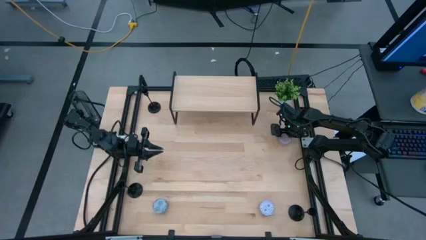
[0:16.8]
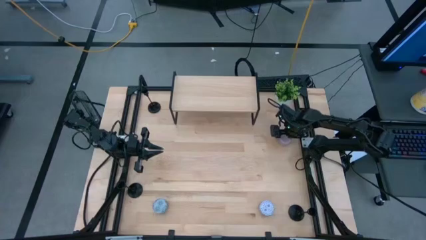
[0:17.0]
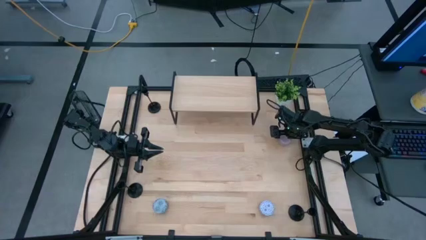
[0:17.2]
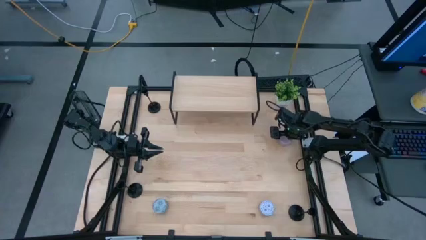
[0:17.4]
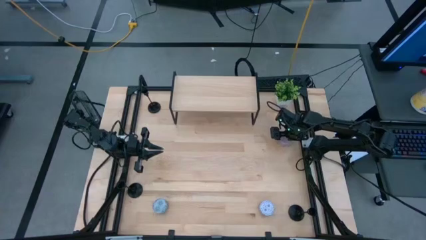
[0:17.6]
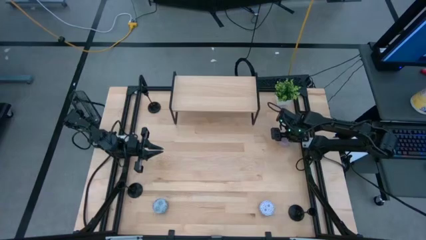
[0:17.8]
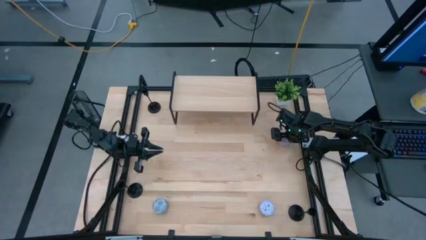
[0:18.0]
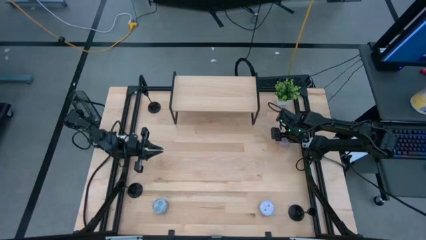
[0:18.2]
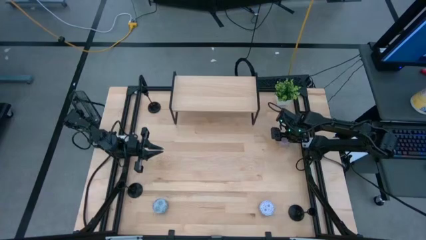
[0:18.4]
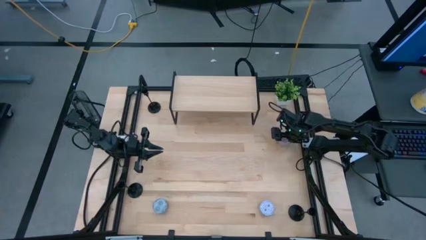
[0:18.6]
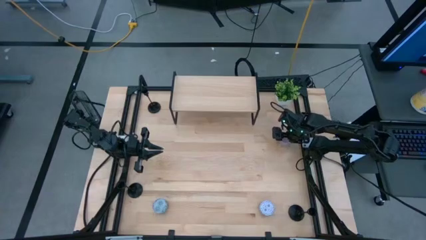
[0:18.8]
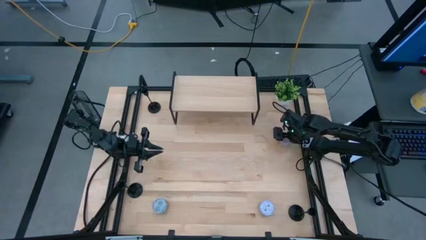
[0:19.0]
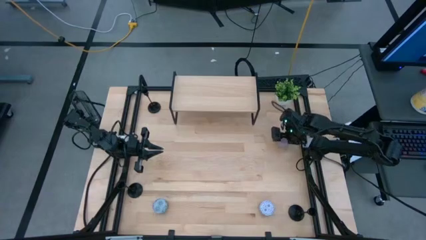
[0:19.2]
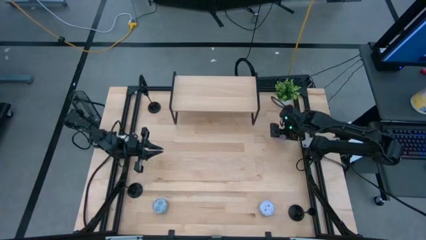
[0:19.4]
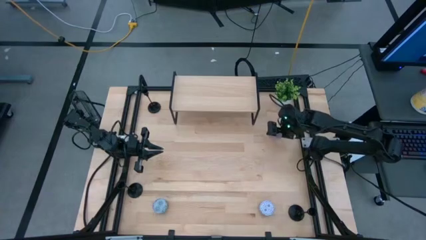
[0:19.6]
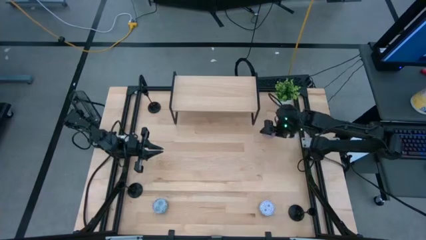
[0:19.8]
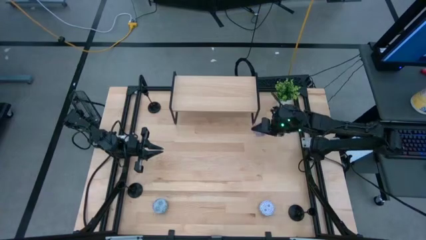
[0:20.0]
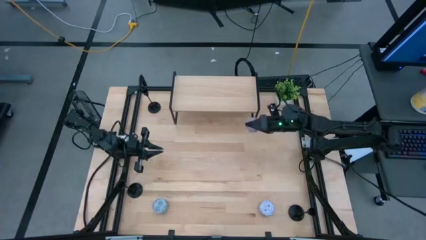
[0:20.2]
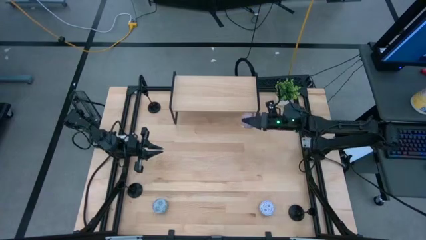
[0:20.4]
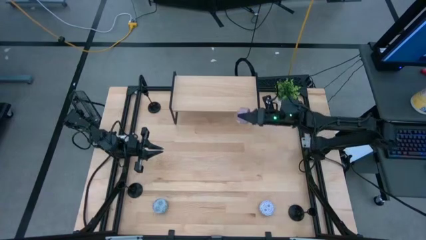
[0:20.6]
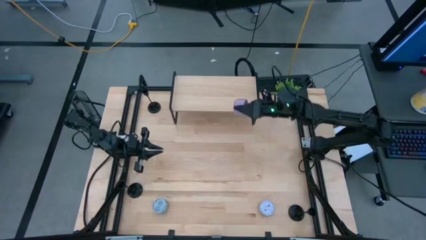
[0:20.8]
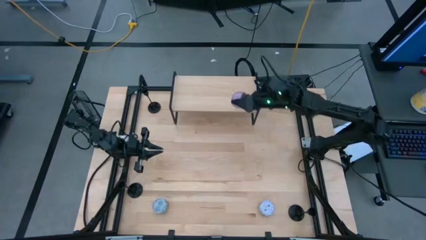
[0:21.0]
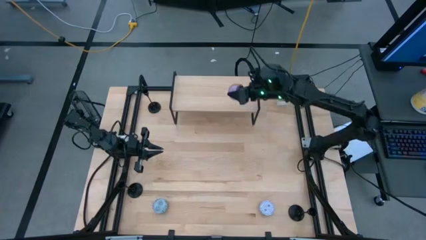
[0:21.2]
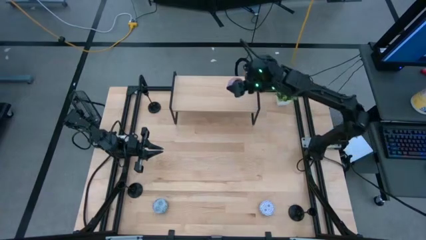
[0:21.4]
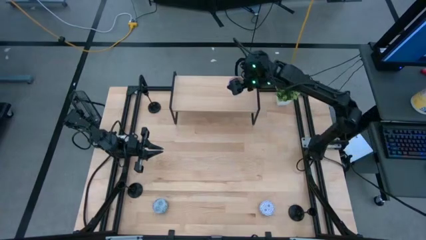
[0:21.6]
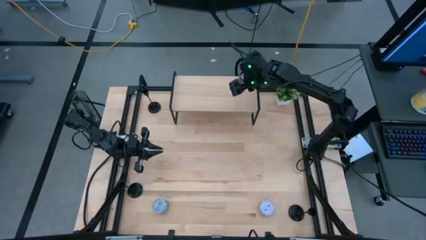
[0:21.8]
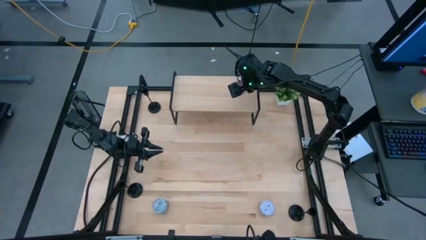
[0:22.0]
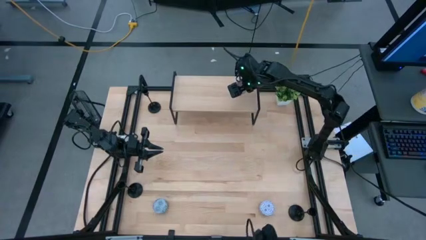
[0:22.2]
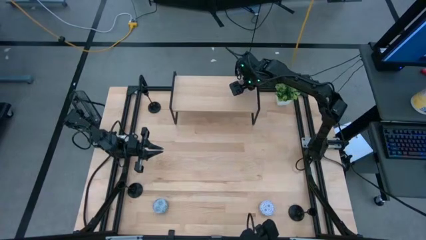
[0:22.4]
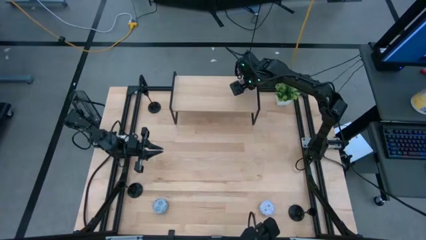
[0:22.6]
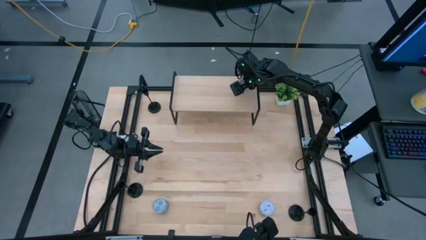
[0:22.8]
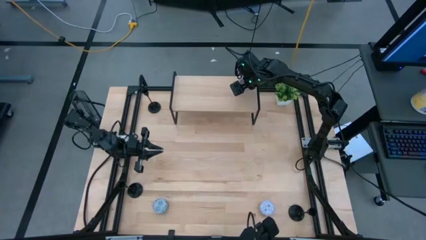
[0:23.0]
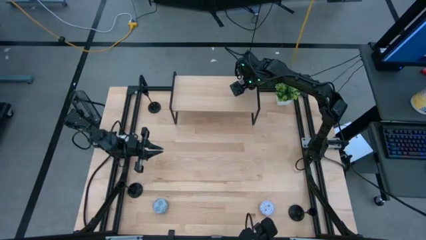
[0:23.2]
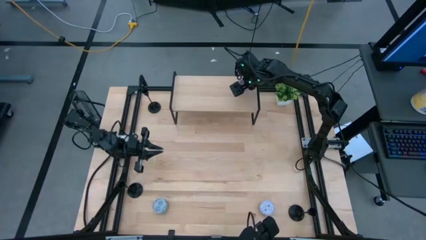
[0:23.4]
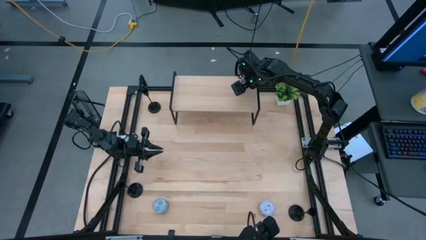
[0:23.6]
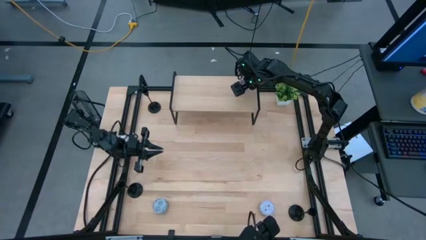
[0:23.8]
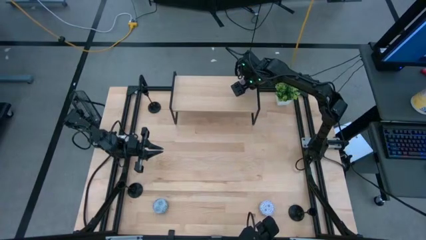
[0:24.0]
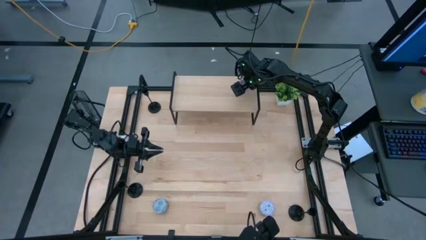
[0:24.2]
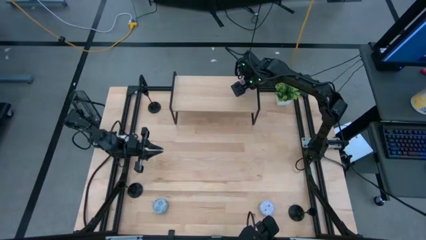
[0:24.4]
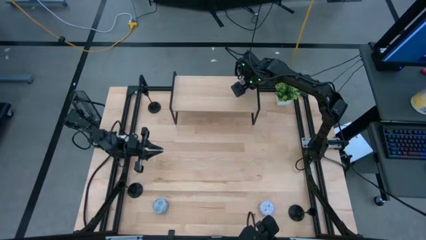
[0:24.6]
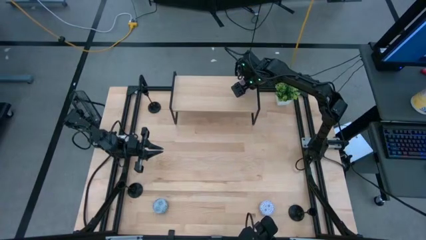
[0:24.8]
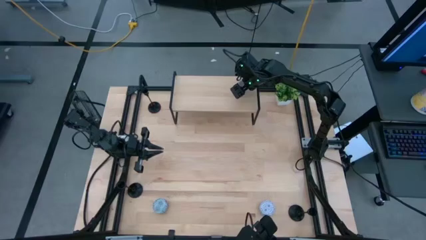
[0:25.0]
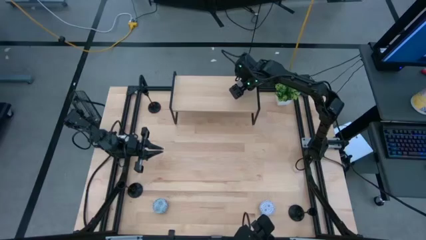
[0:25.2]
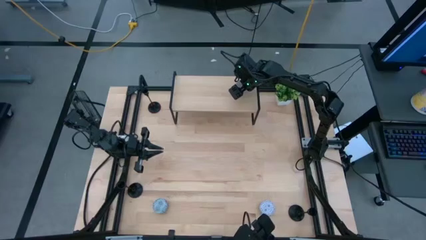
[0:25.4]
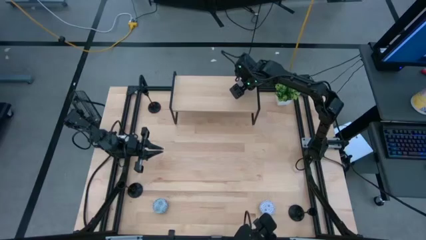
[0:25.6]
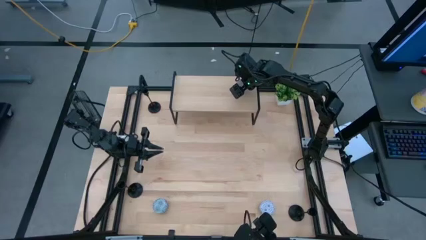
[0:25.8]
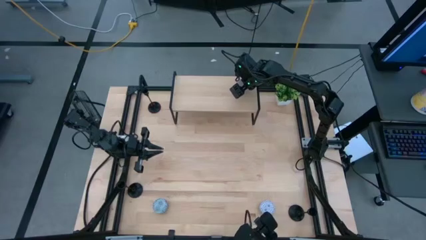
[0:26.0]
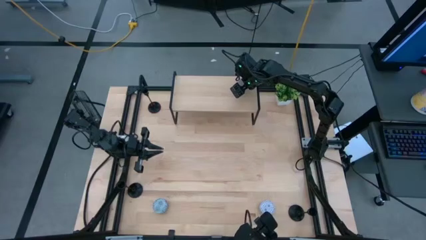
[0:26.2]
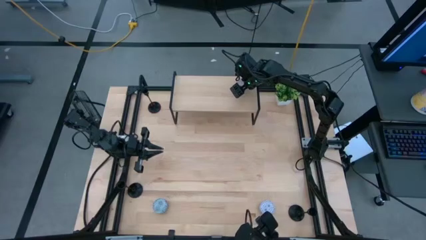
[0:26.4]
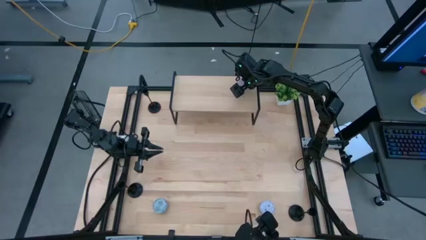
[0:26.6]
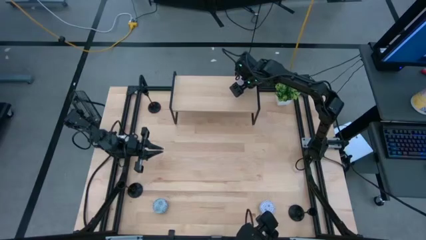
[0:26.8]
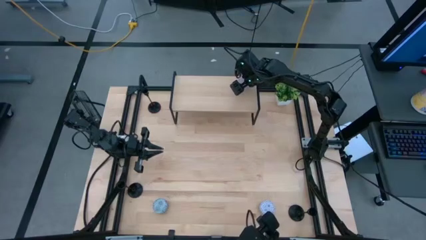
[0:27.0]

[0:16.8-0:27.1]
Task: Pick & Place candle stick holders
Put the purple scented candle on the shelf
